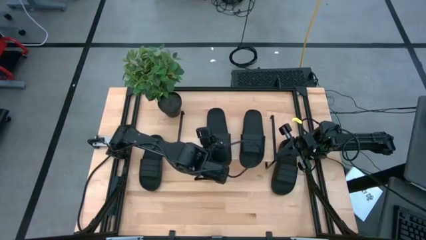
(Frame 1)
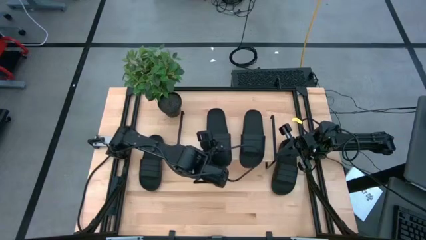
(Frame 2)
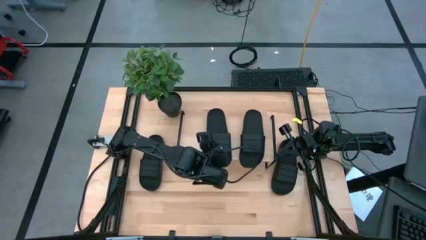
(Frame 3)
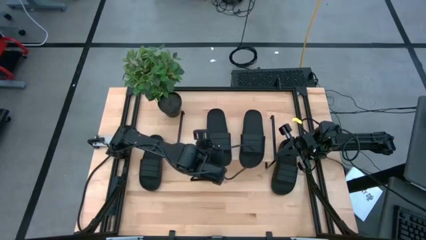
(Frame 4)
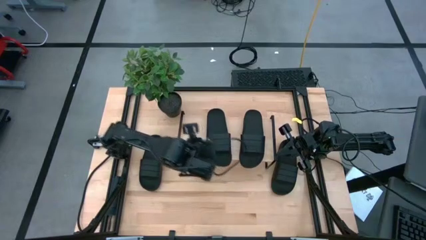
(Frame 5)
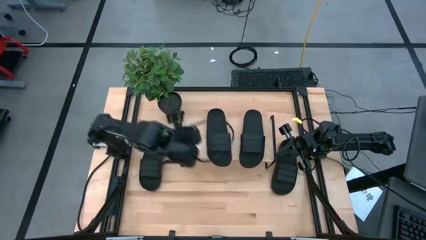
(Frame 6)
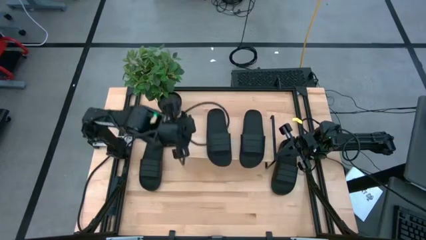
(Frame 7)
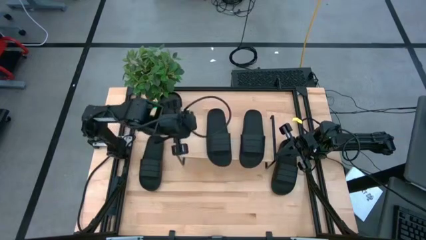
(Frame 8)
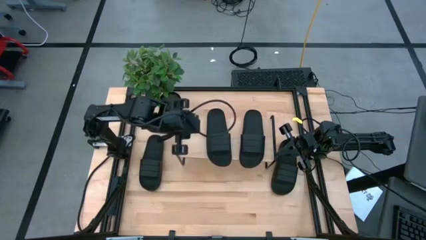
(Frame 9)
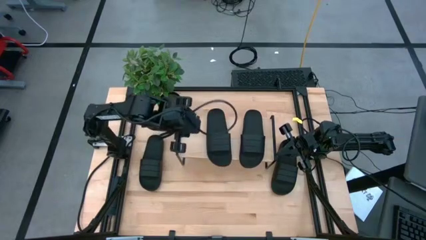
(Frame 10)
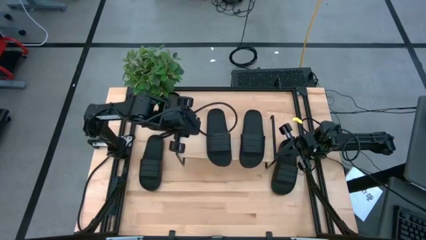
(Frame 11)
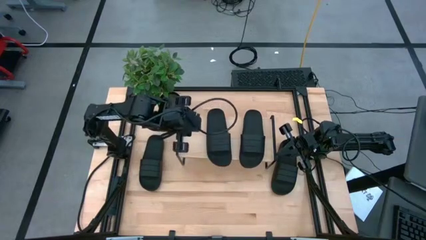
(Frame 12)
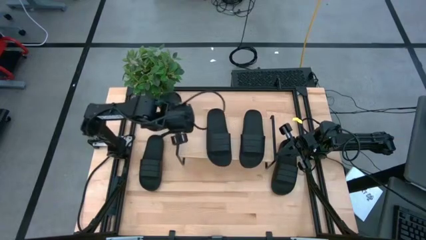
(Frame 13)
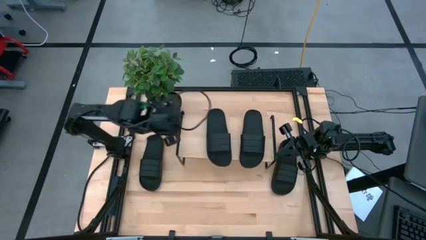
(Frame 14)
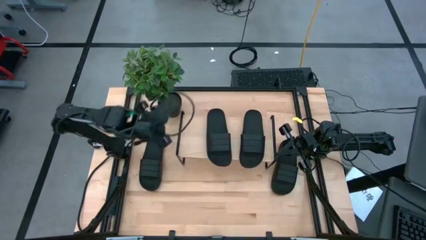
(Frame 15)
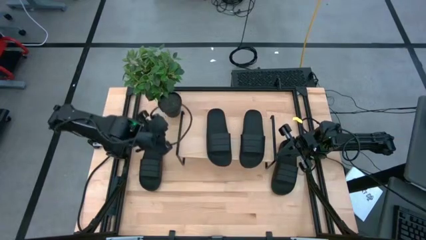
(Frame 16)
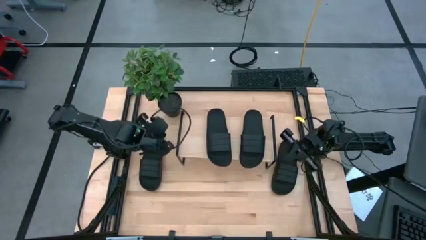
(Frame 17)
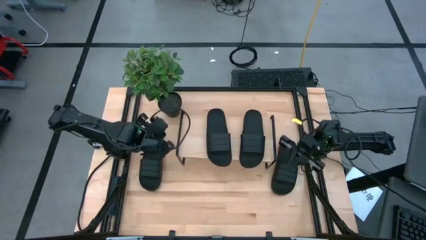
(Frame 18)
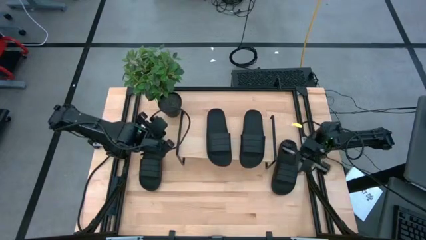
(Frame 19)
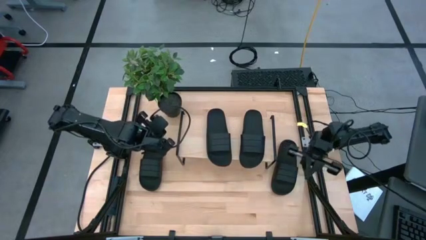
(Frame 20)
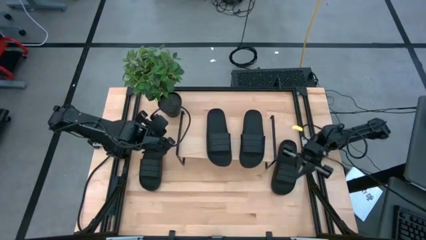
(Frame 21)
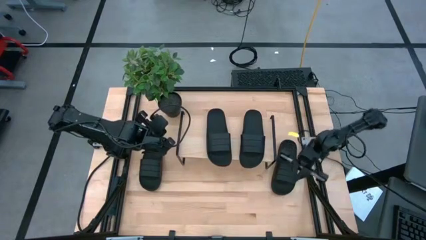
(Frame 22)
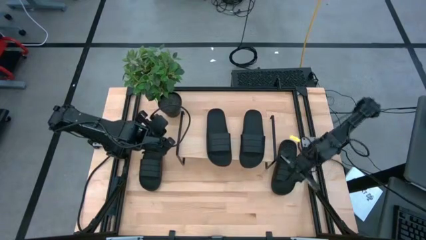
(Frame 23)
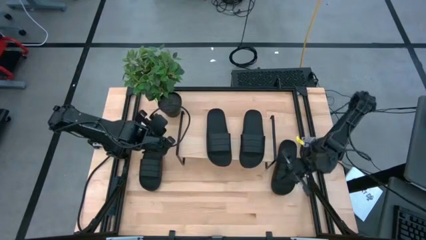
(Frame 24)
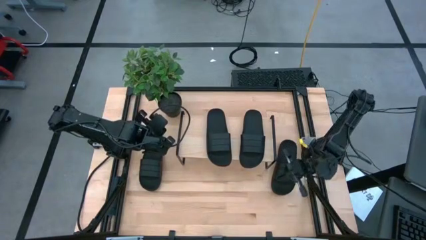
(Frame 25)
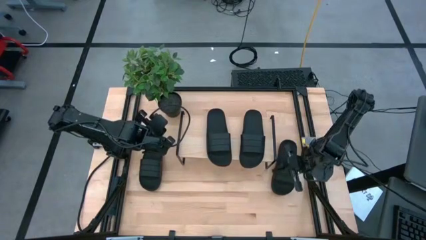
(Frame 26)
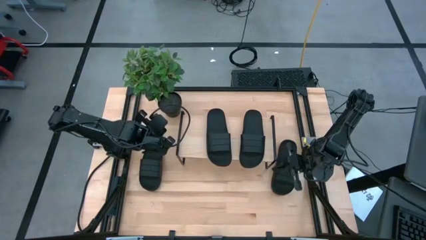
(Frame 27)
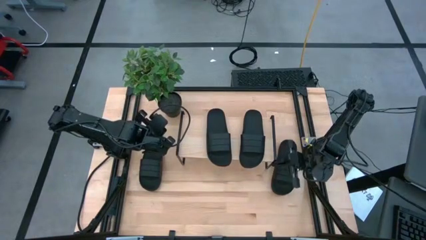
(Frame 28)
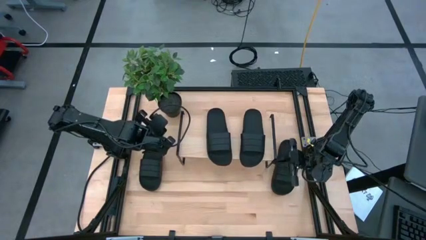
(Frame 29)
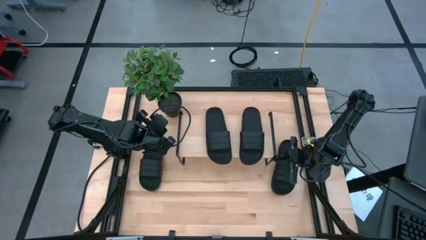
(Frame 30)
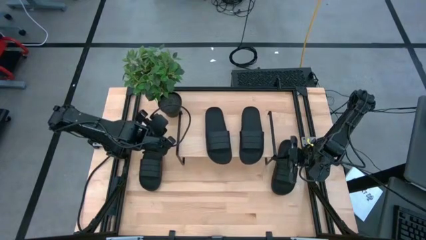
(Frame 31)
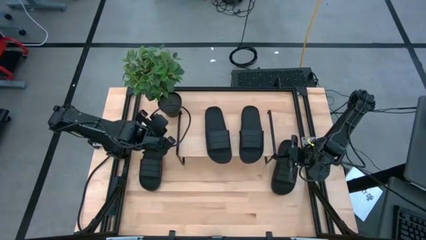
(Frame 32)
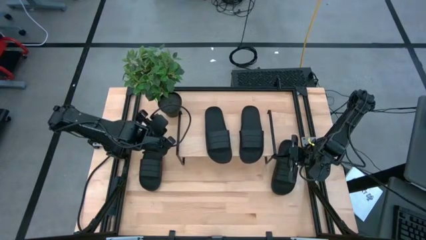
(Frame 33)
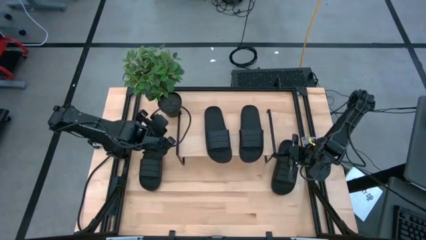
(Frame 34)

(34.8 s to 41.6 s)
Task: Pick and place slides into the shelf
Adjust the shelf

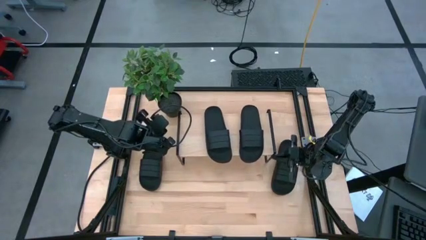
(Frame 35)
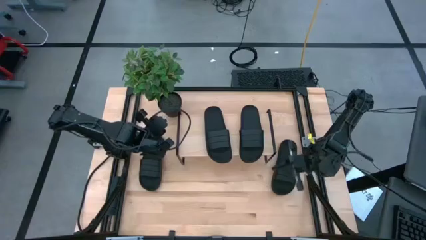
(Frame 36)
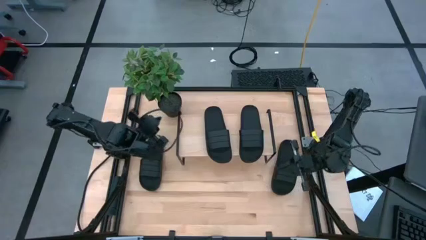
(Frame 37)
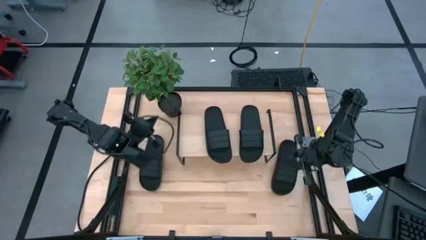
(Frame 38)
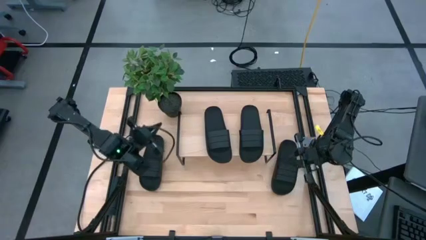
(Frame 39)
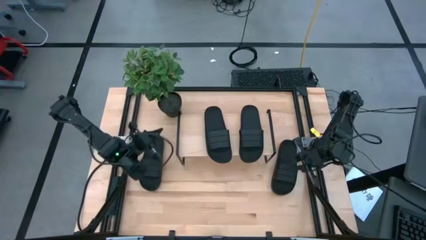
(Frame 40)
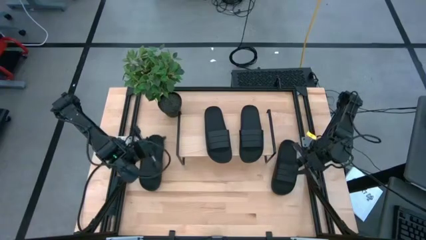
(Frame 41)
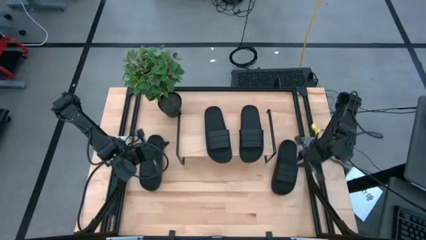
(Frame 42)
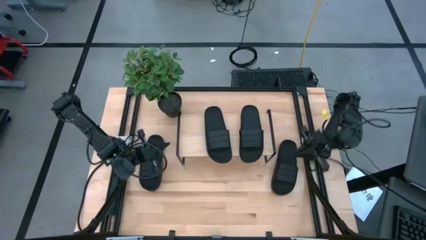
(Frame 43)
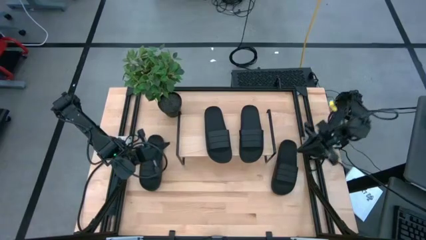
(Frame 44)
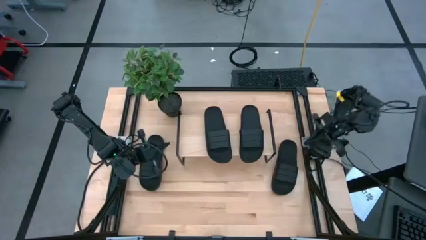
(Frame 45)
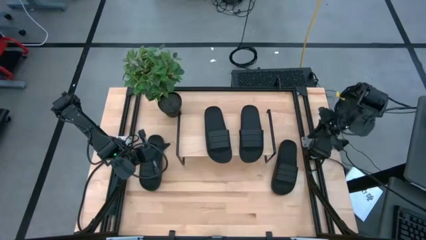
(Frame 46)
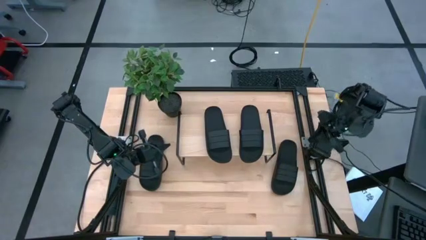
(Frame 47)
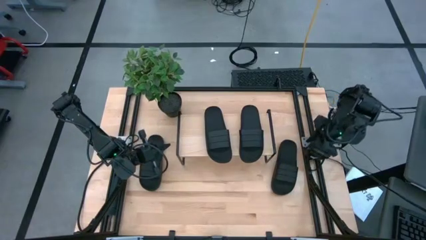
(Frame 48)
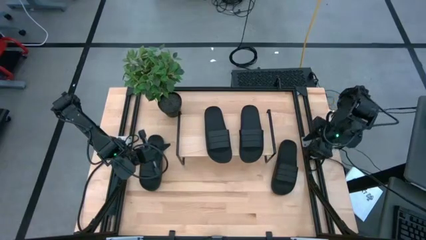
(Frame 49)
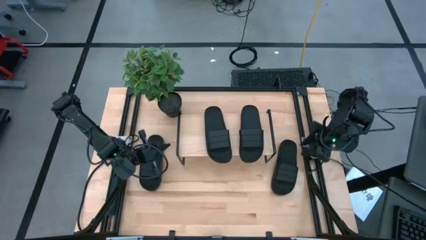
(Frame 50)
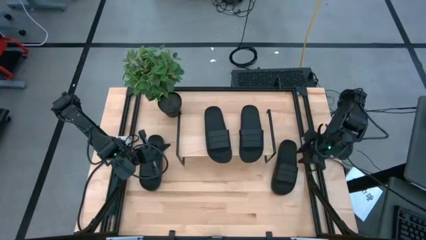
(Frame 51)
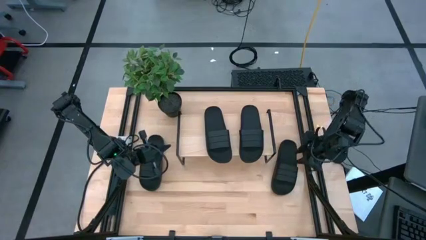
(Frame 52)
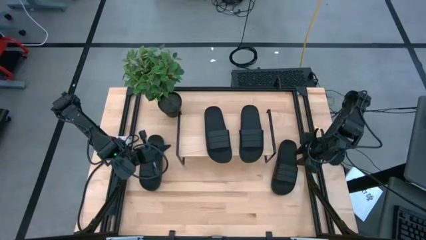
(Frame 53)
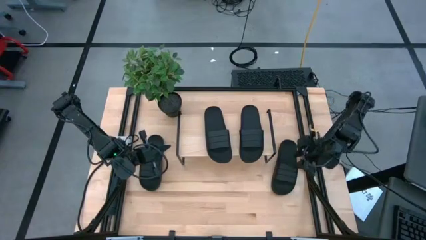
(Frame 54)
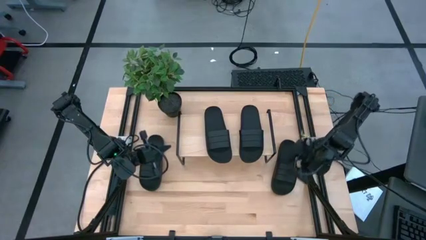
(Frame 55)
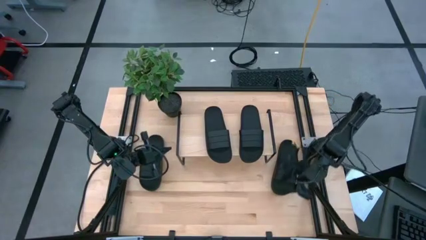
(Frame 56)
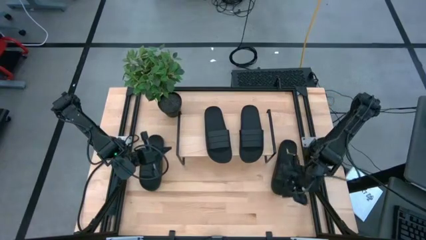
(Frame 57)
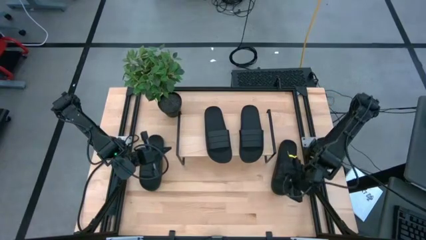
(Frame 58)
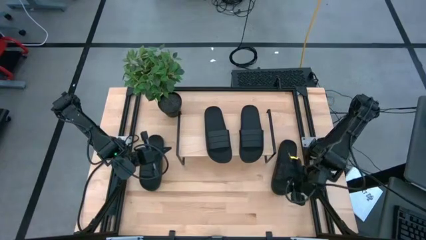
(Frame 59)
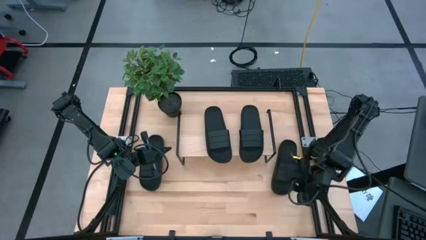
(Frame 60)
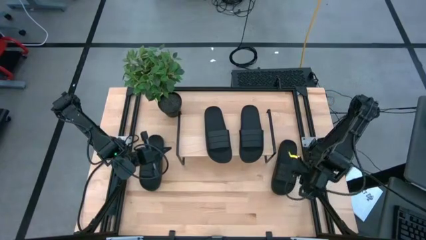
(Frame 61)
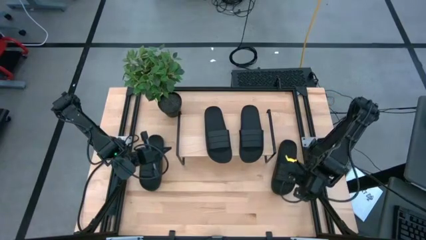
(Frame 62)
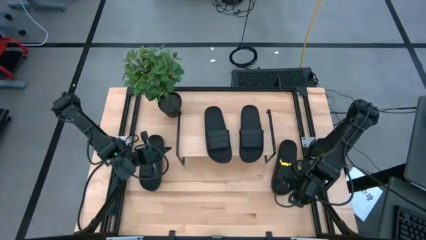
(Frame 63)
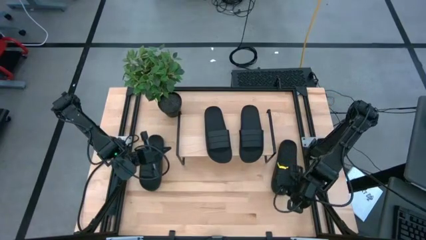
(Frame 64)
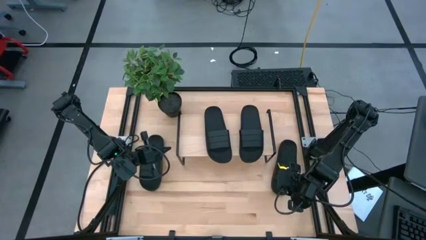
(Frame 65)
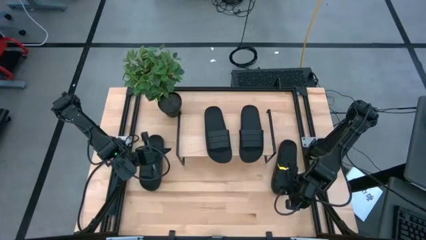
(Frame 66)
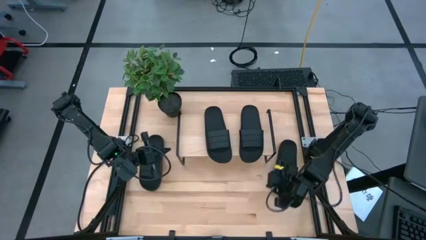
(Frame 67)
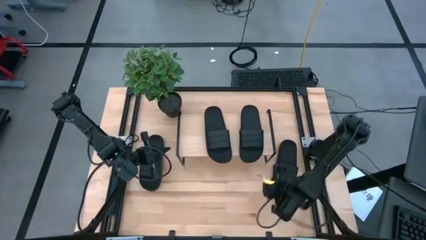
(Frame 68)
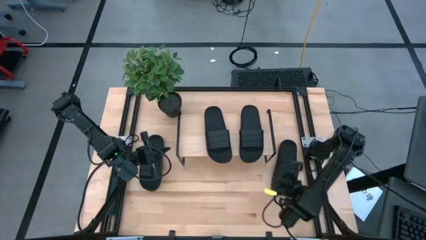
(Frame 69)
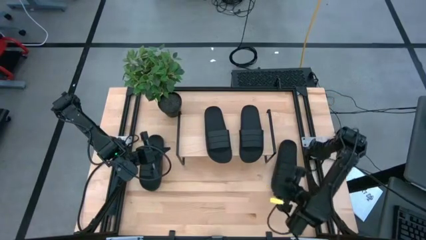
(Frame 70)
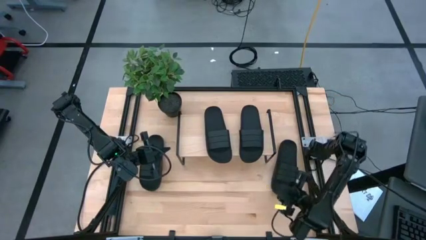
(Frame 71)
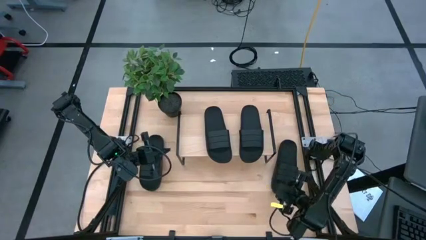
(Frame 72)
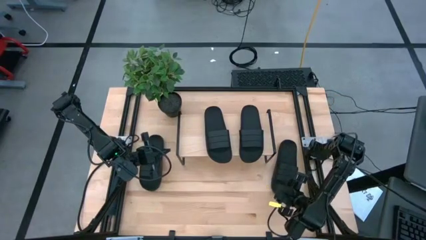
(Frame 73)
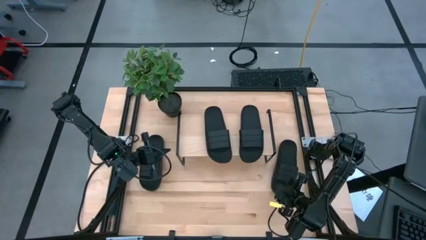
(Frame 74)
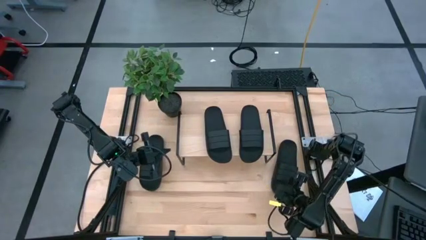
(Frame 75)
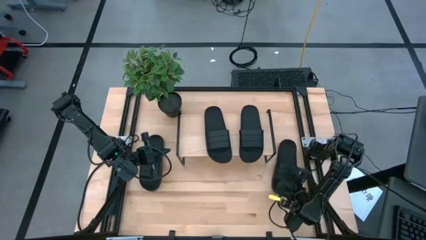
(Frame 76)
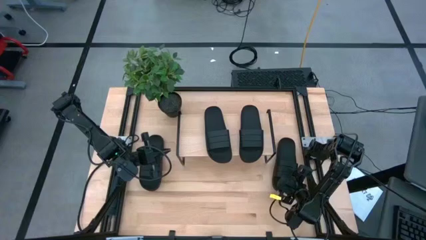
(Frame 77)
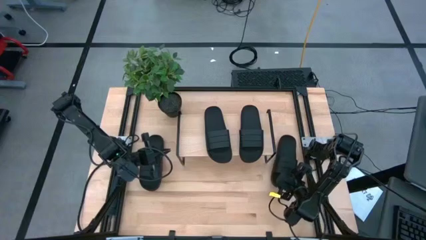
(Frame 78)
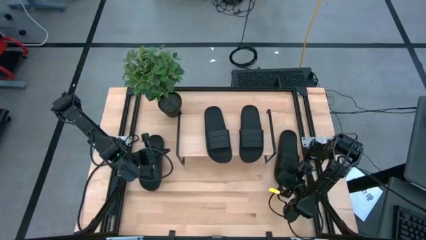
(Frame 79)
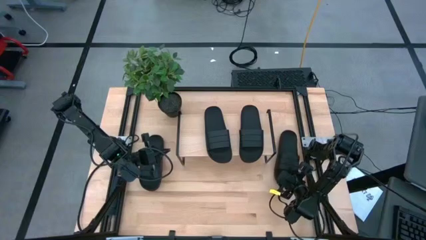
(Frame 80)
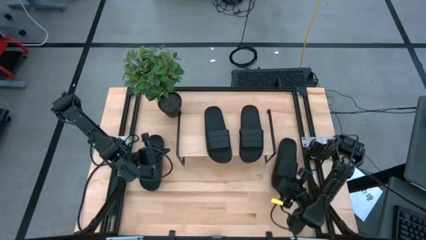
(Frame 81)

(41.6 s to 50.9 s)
Put the left black slide under the shelf
